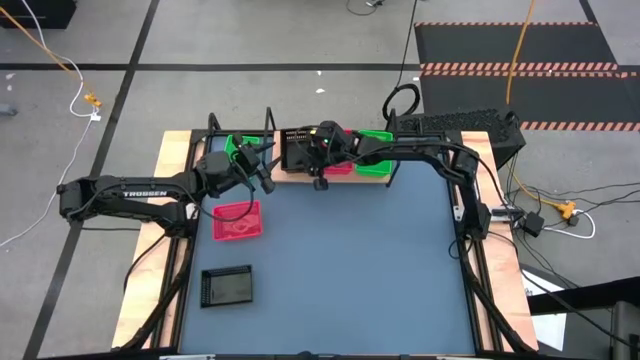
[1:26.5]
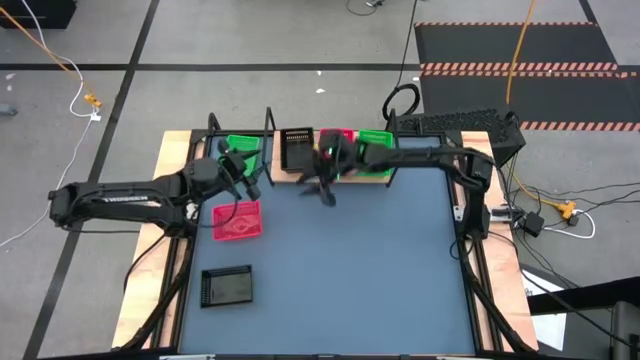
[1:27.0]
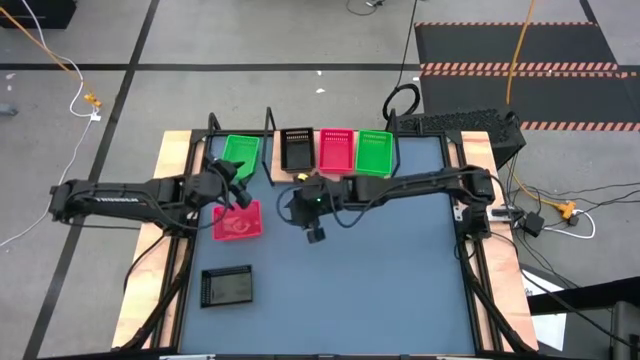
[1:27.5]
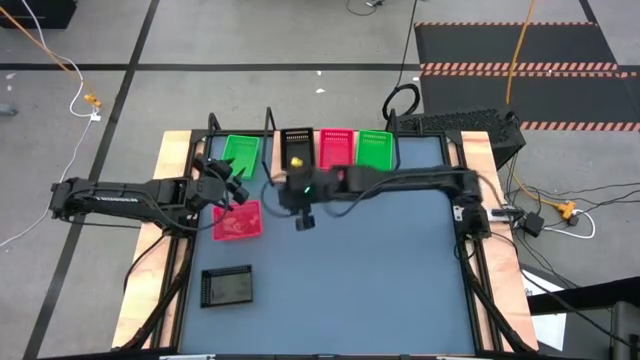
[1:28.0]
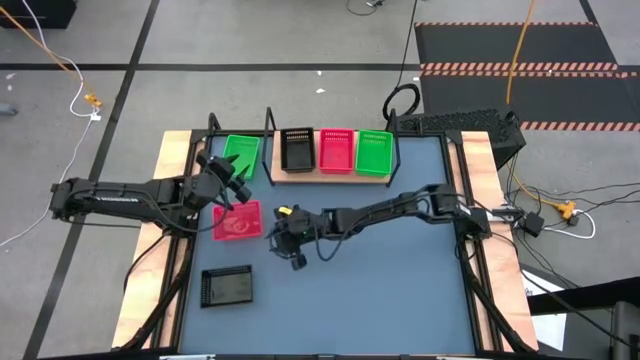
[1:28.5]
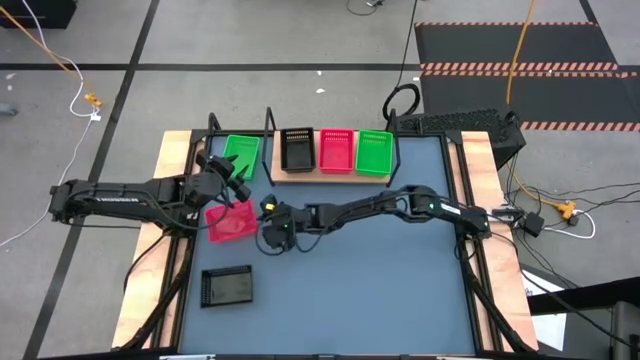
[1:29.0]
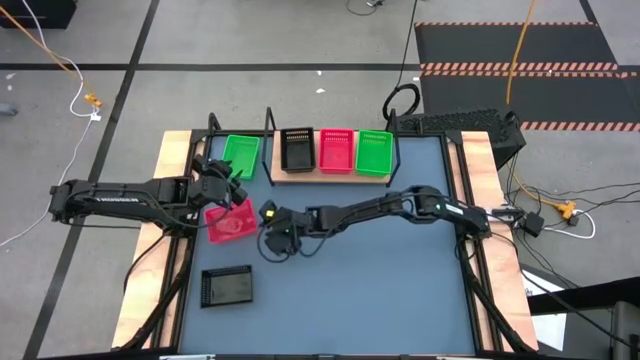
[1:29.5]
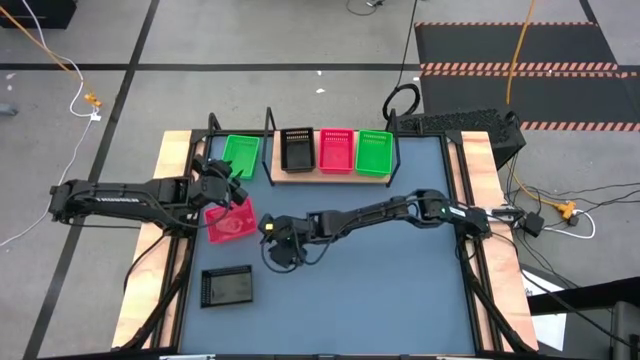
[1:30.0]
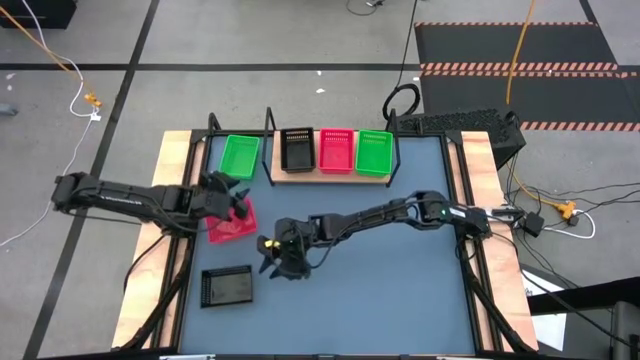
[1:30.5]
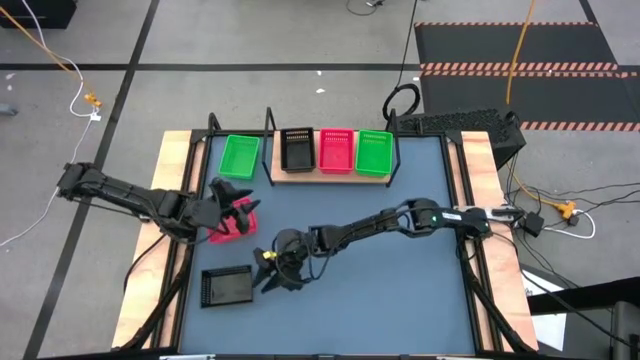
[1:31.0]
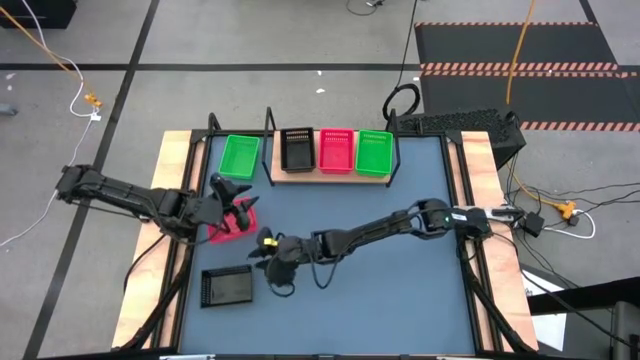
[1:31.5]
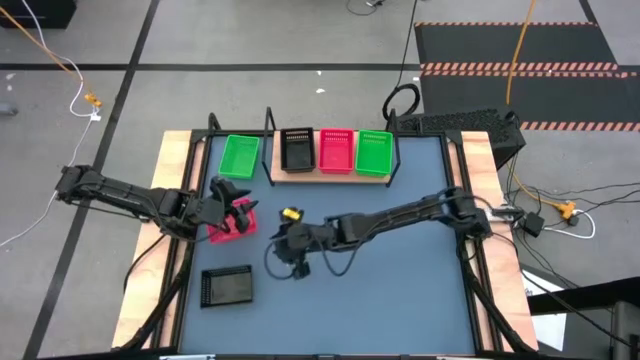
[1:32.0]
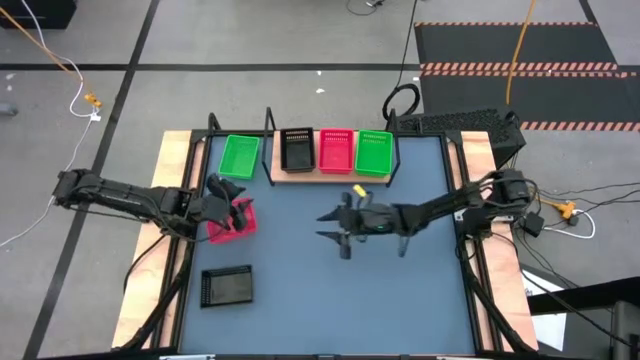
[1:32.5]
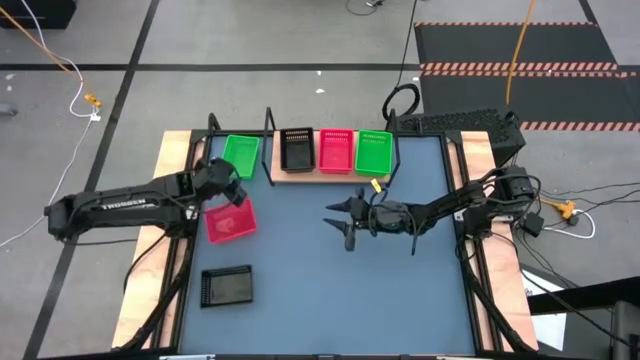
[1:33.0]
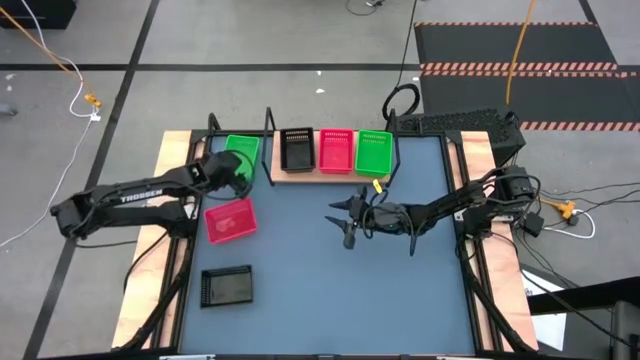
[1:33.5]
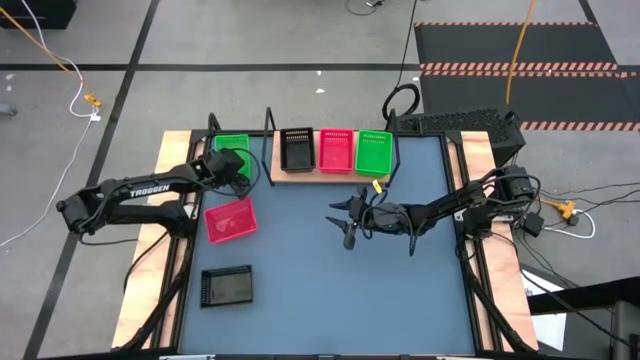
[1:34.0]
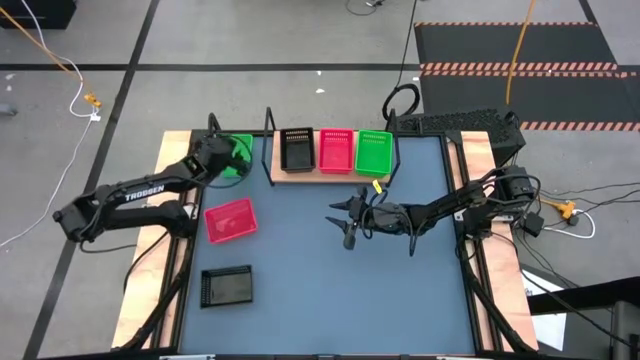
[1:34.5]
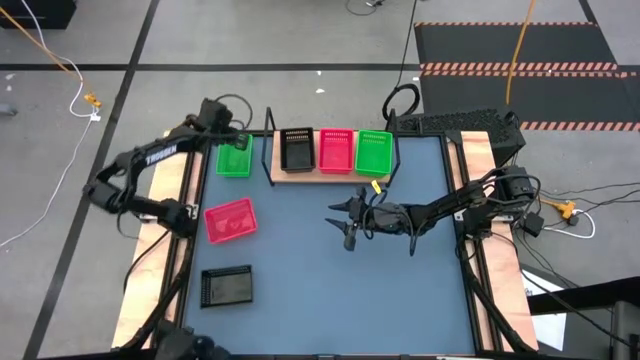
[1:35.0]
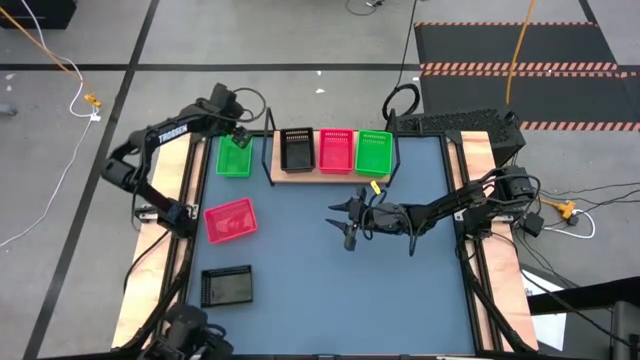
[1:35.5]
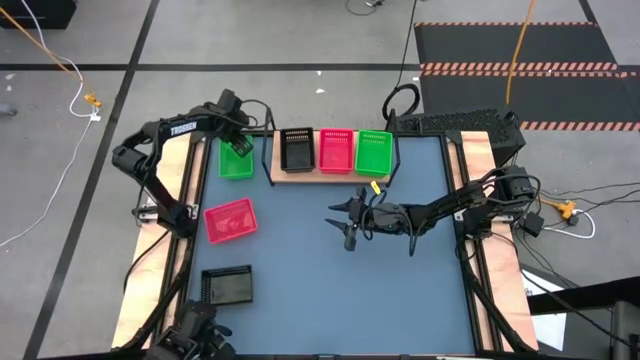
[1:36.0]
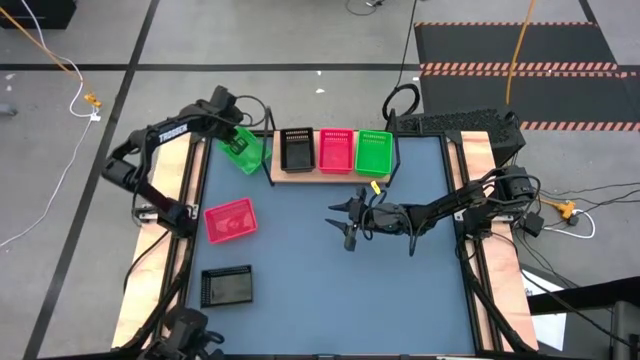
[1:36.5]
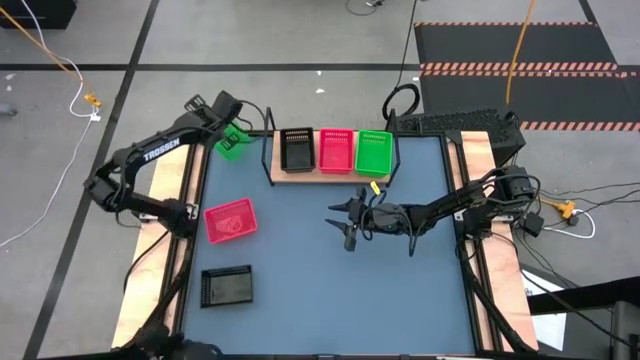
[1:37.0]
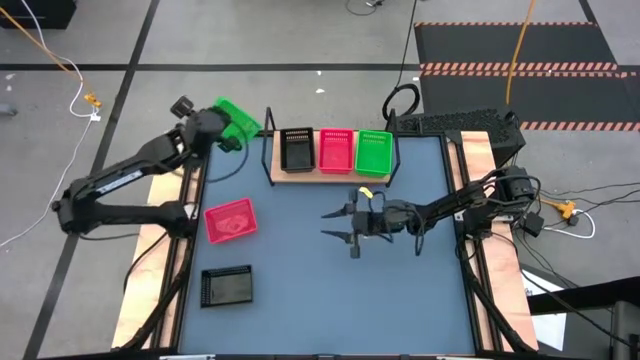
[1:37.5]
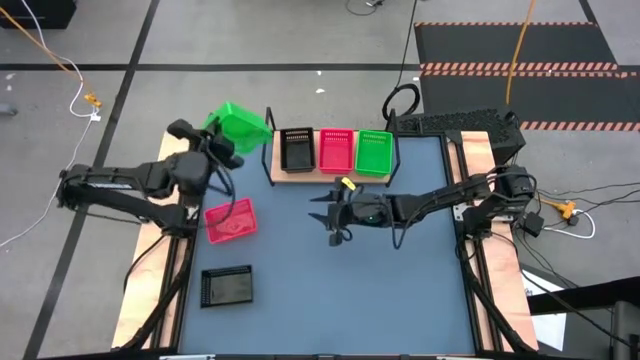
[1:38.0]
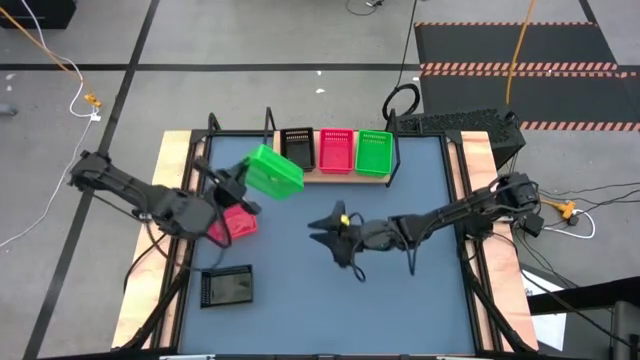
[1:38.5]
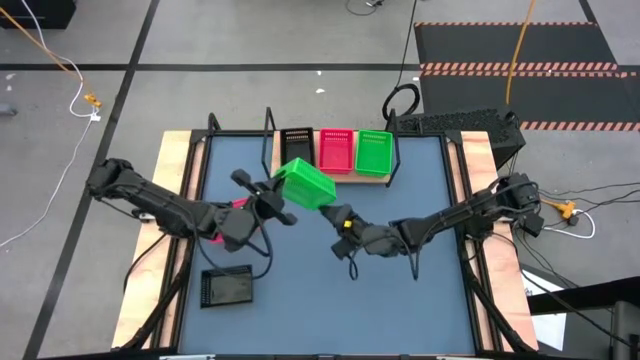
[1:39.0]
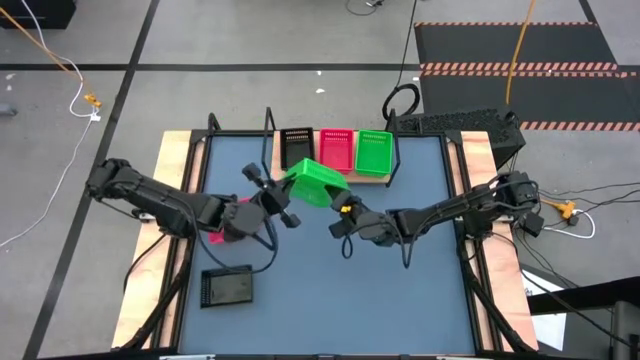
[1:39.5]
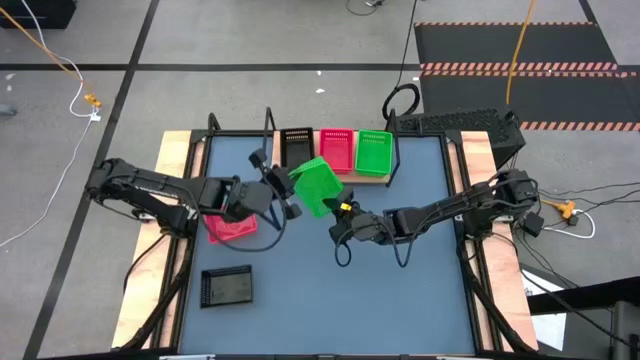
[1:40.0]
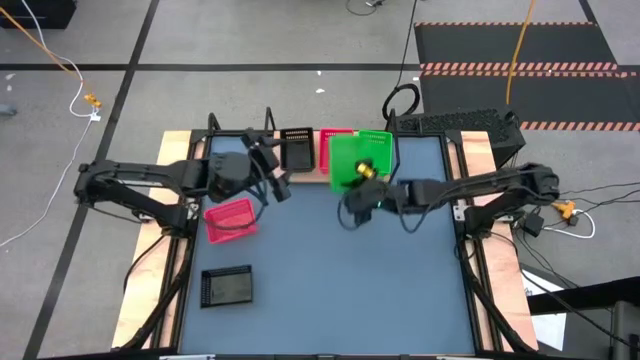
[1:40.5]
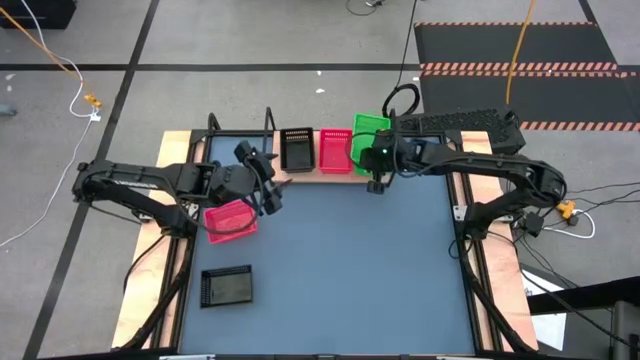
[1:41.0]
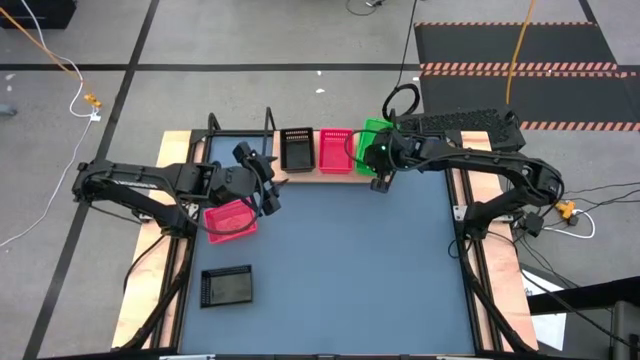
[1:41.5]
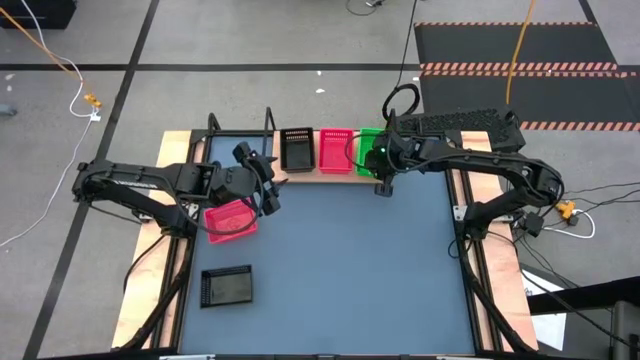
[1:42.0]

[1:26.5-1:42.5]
Task: Stack baskets on shelf by color
Stack the green bin on top of the green bin on the shelf

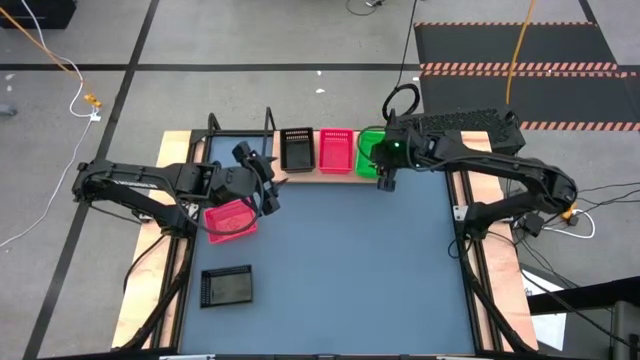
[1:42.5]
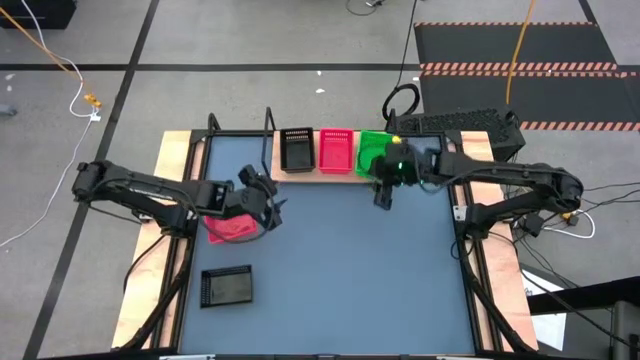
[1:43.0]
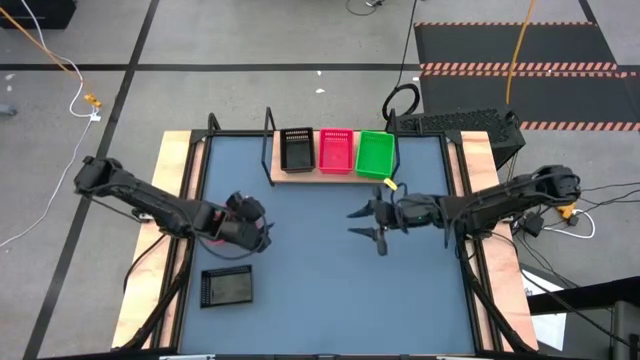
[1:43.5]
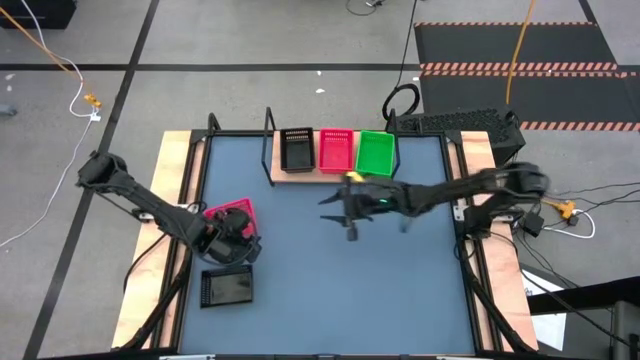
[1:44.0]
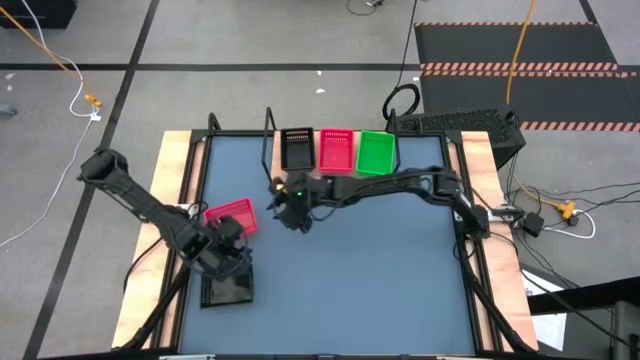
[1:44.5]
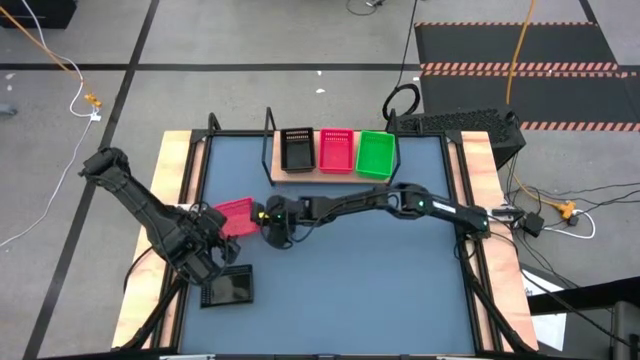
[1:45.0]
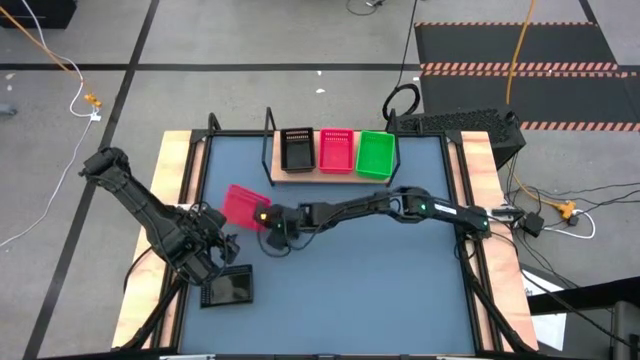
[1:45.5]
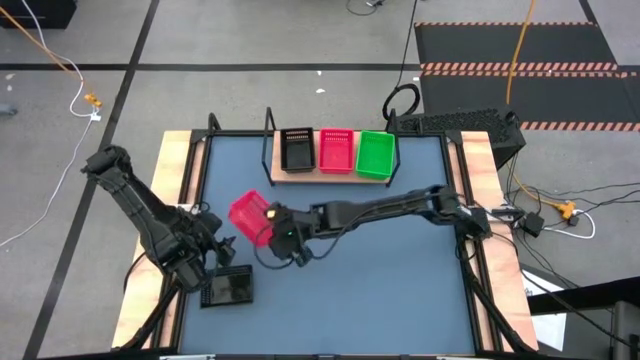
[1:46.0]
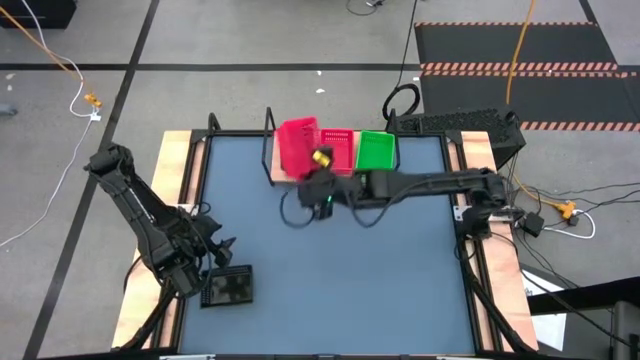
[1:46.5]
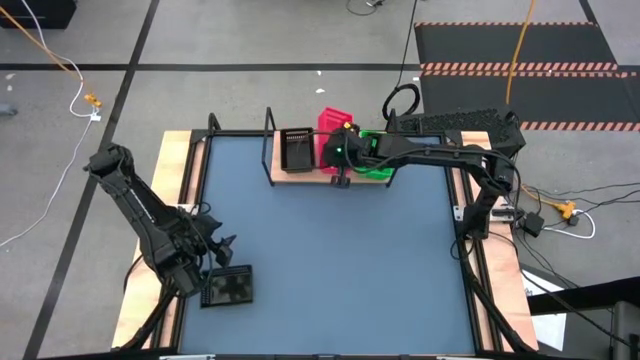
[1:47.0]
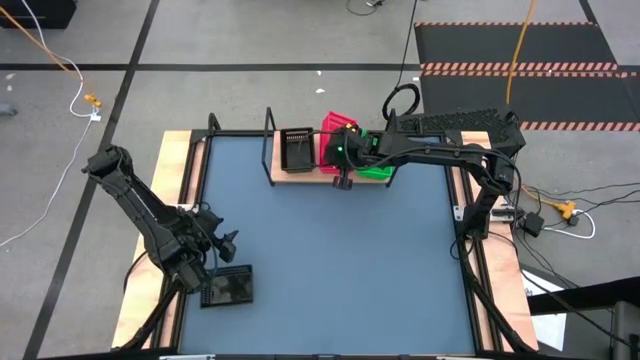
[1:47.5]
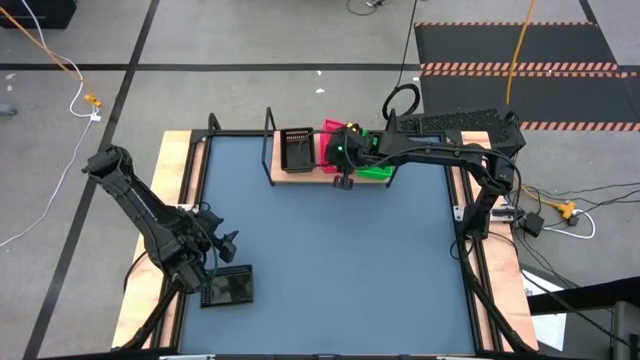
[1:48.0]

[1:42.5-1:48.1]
Stack the red bin on top of the red bin on the shelf
